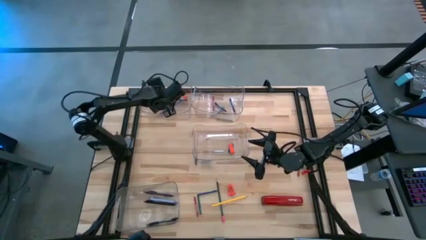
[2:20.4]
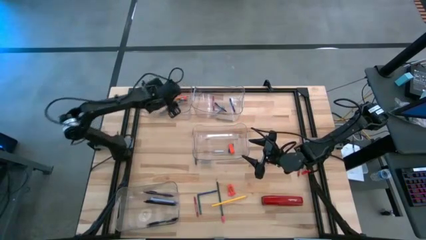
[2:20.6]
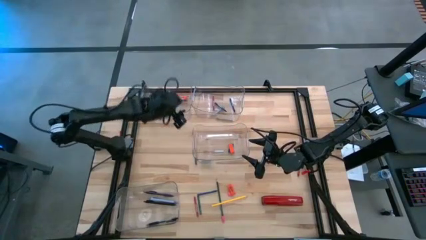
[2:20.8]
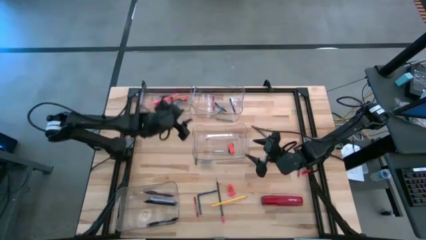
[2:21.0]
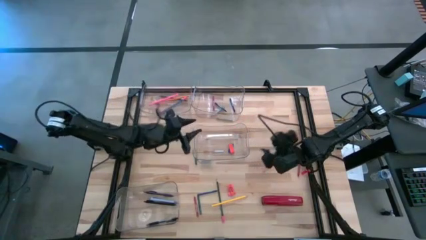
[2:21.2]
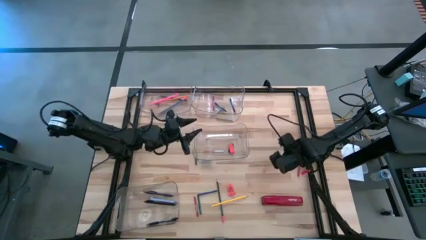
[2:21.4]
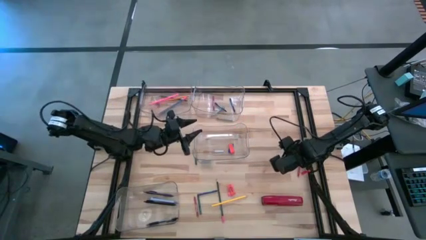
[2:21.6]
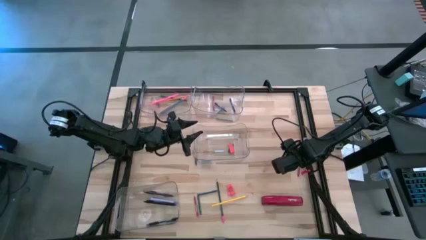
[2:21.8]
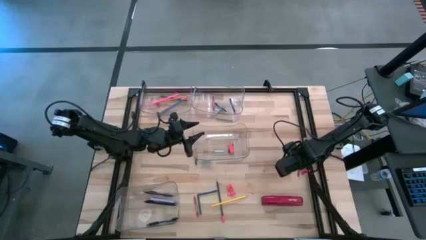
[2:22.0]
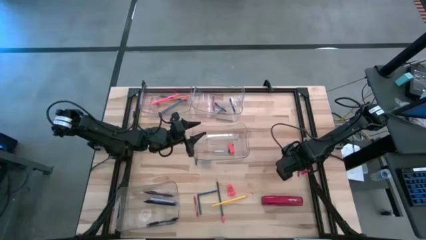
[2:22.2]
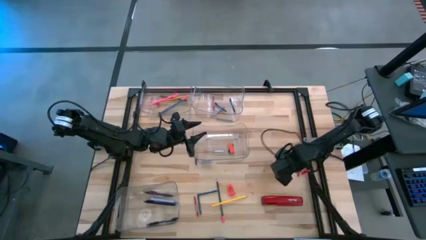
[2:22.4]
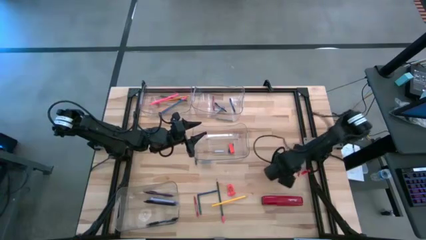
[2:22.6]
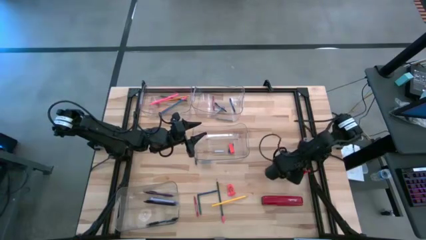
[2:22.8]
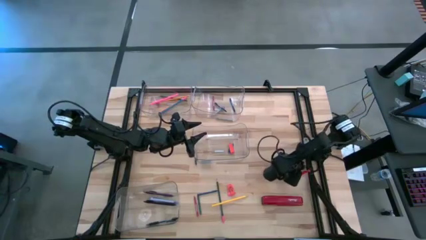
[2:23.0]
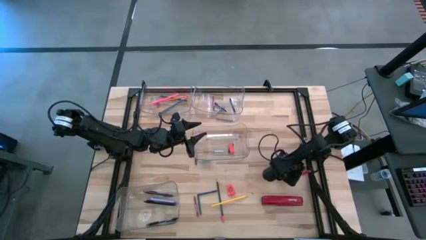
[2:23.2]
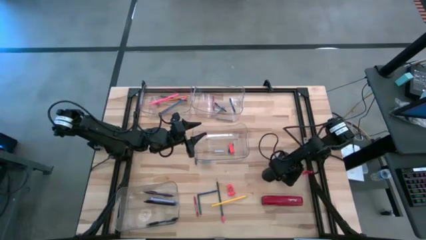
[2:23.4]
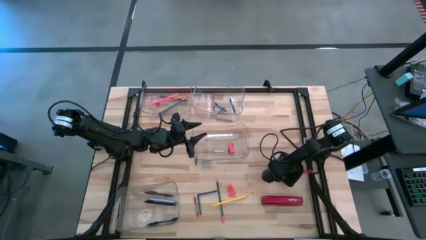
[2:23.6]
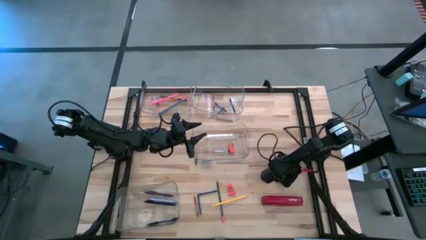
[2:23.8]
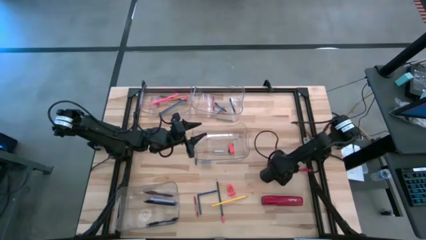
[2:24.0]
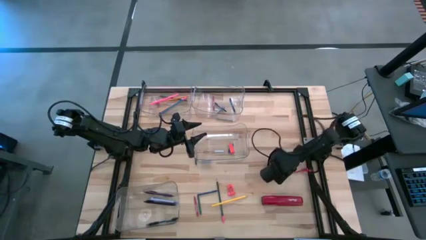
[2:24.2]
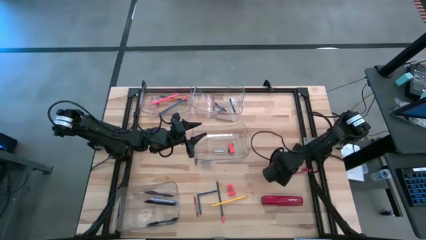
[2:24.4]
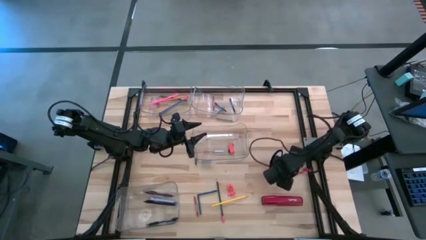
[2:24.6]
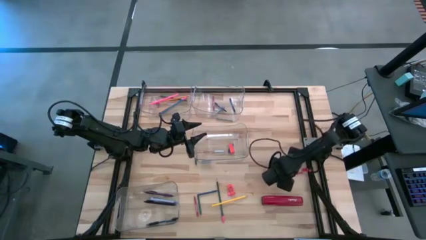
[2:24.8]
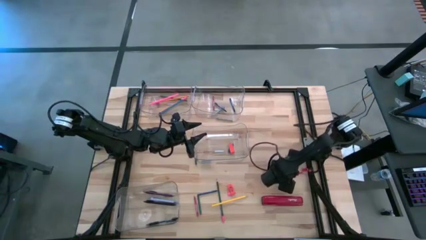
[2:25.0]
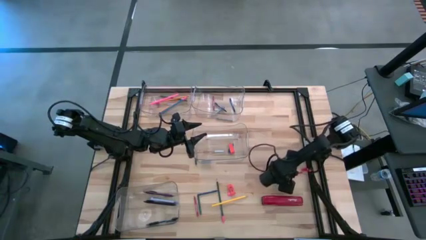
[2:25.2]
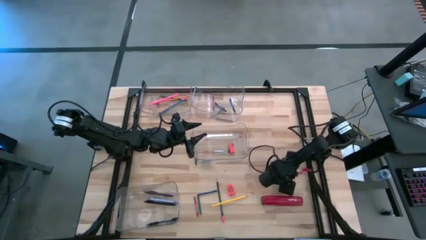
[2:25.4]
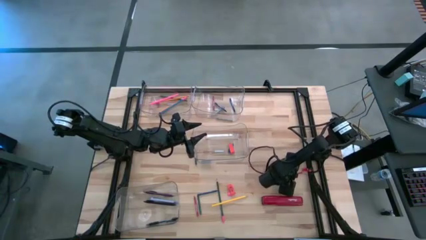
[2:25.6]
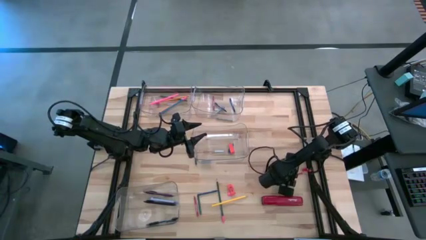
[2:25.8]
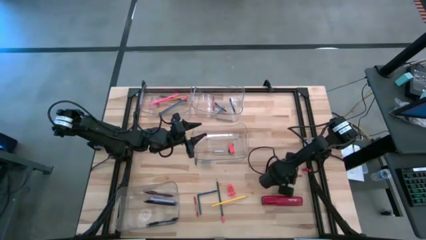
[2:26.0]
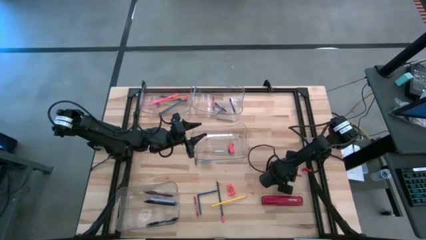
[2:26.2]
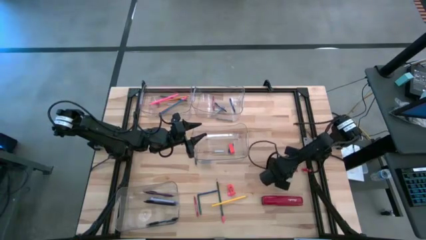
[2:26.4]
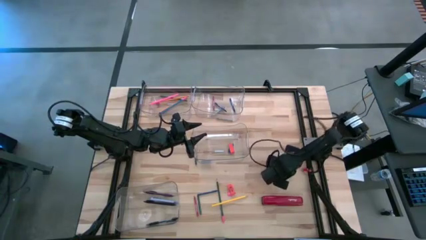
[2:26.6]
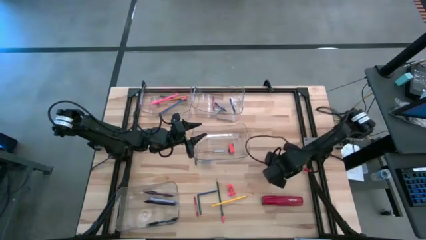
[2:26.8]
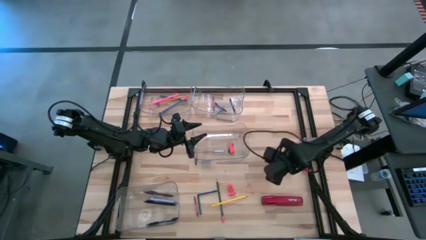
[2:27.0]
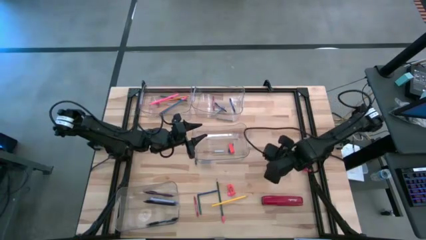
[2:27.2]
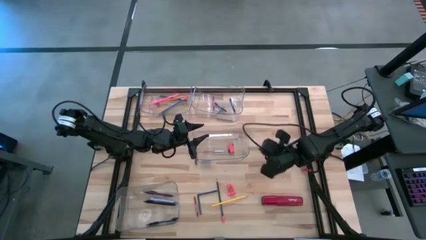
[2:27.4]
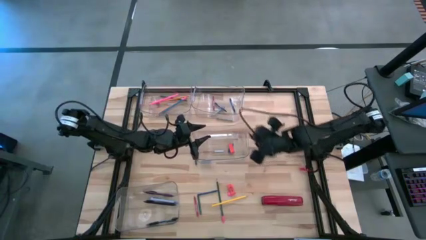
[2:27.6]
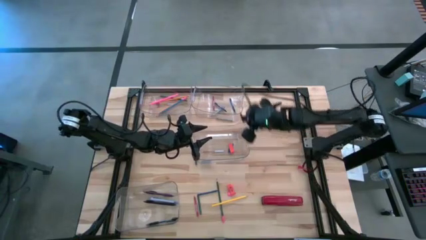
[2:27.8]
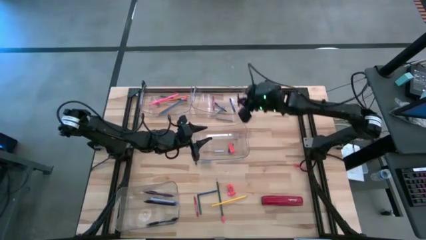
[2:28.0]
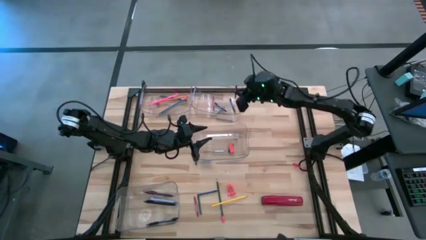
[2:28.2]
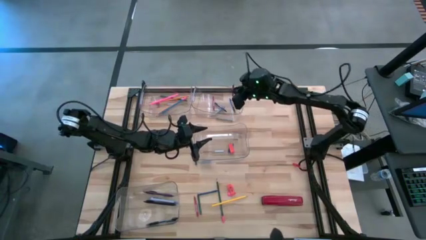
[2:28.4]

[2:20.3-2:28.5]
Task: Sort crayons/erasers/pens/pencils in bins
Put the top red crayon into the top right transparent bin

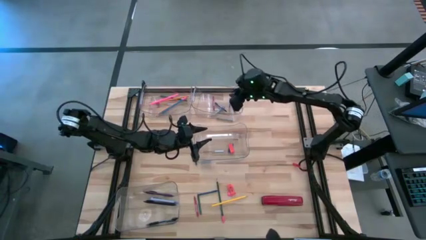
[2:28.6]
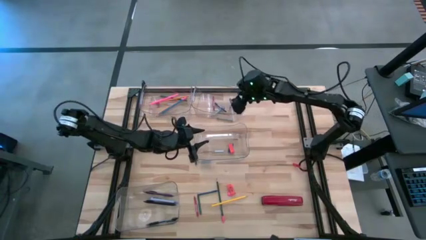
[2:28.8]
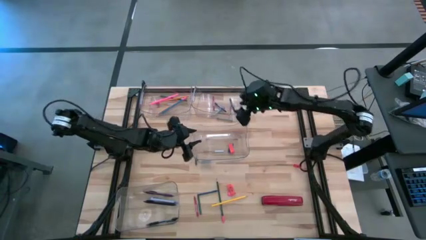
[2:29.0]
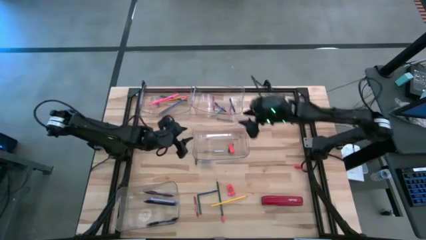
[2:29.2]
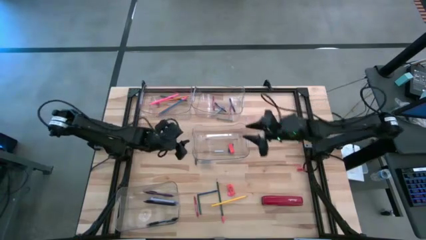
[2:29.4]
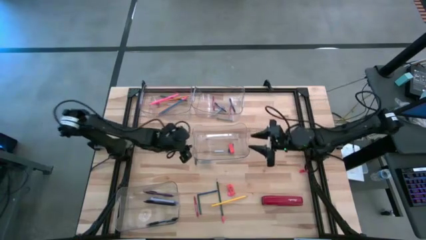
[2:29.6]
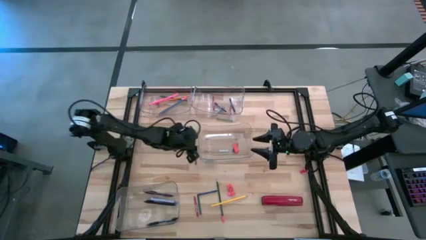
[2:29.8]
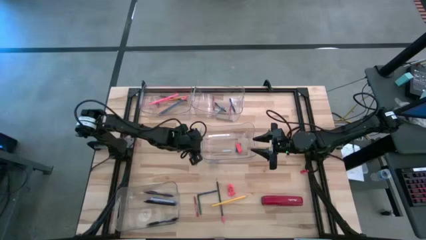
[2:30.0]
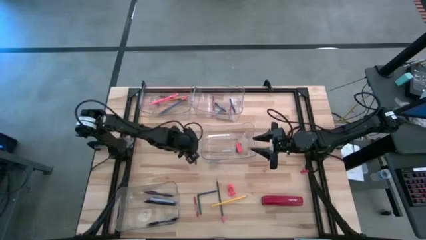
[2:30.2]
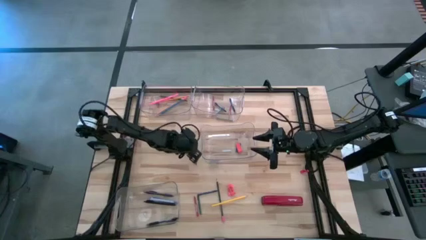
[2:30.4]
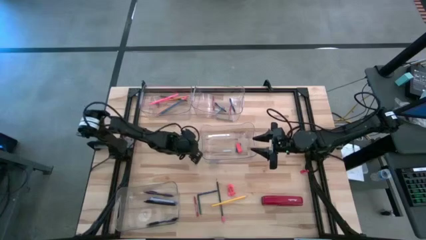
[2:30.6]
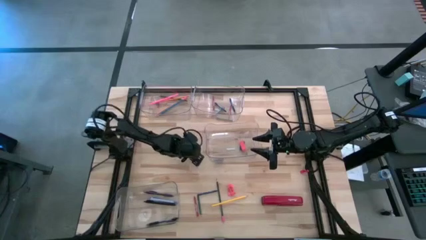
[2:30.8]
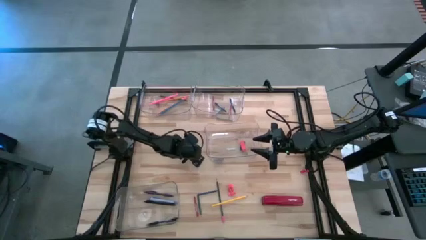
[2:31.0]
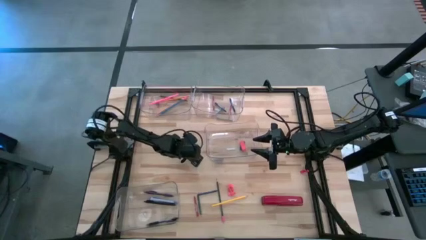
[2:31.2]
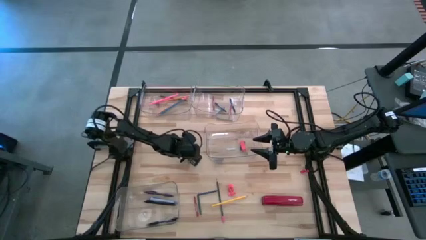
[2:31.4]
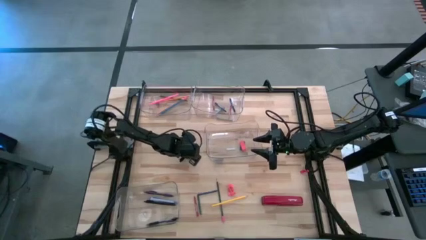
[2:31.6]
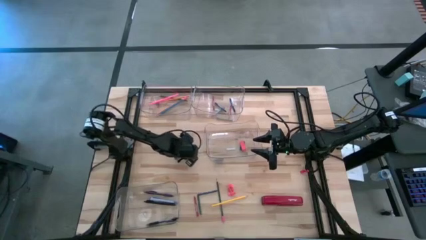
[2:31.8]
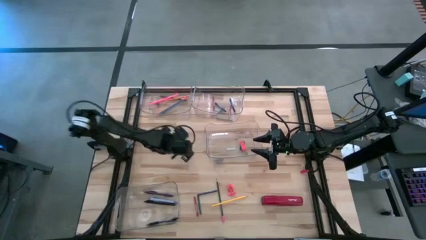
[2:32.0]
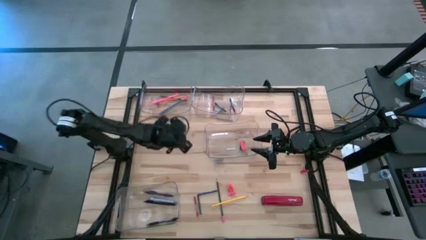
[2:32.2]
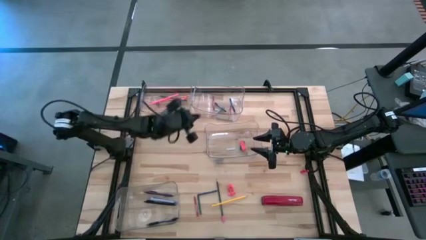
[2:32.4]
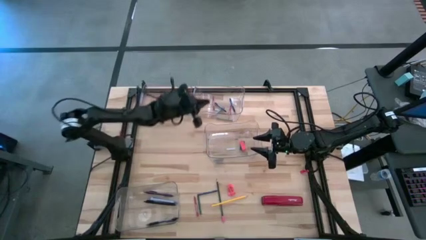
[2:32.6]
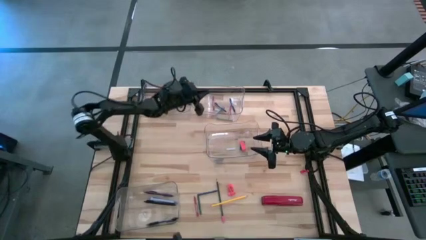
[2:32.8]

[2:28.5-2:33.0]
Put the top green crayon into the top right transparent bin

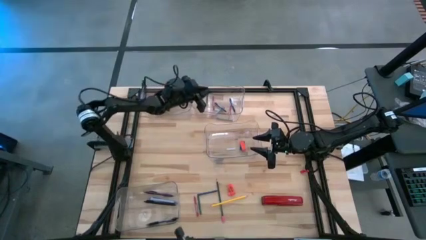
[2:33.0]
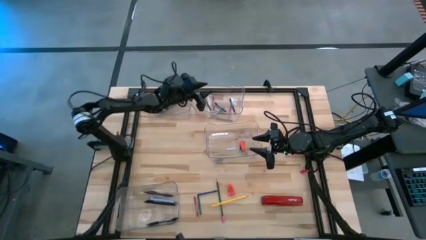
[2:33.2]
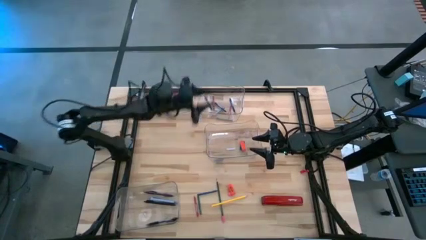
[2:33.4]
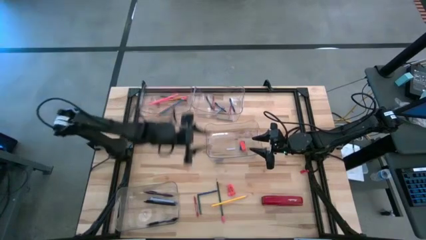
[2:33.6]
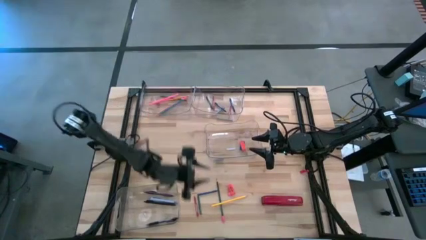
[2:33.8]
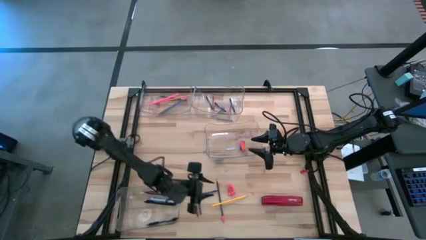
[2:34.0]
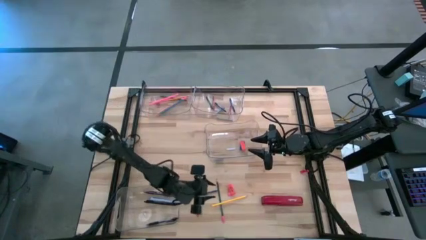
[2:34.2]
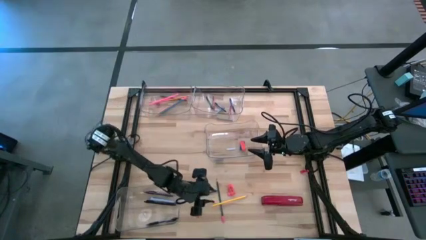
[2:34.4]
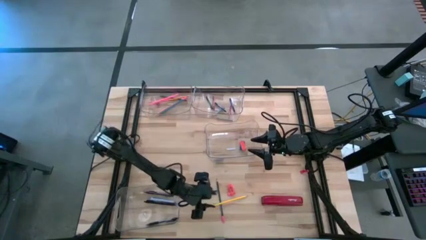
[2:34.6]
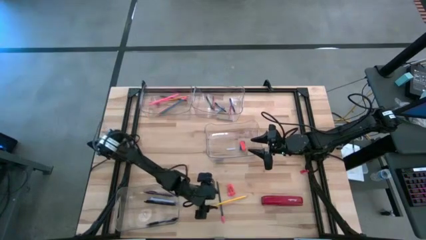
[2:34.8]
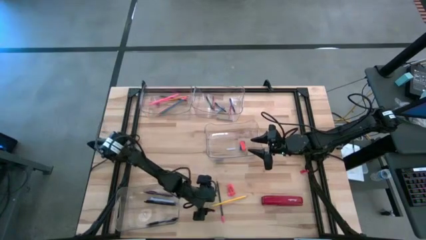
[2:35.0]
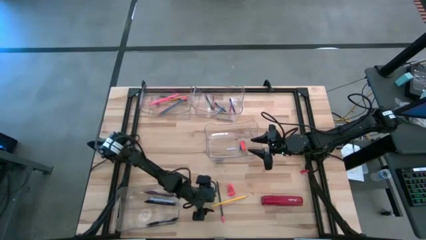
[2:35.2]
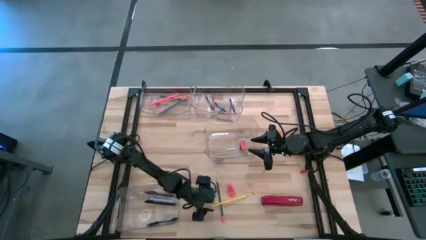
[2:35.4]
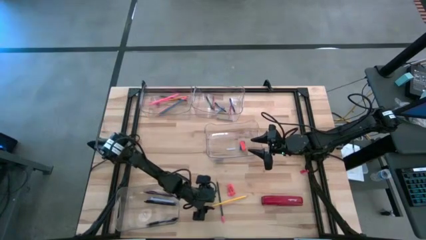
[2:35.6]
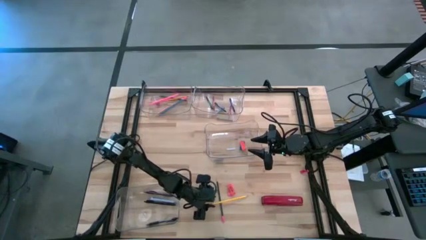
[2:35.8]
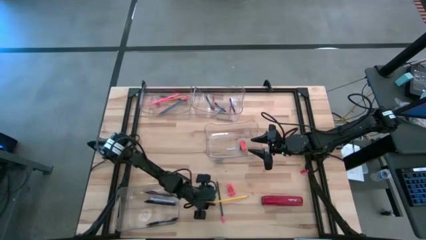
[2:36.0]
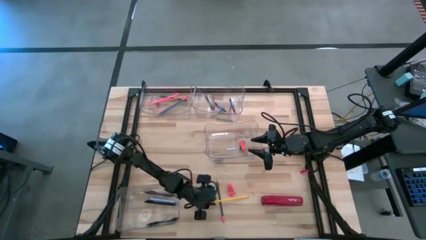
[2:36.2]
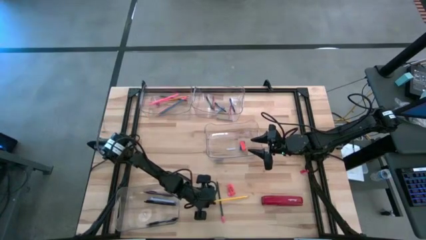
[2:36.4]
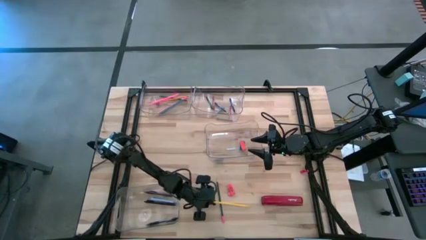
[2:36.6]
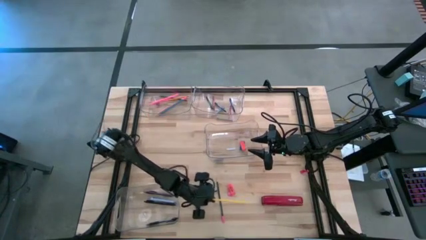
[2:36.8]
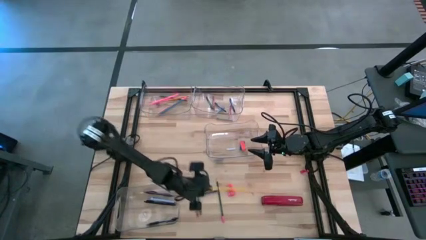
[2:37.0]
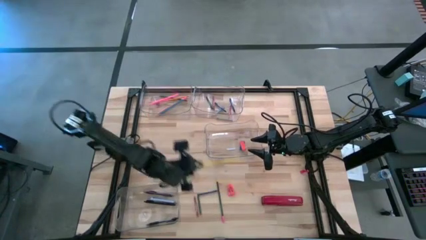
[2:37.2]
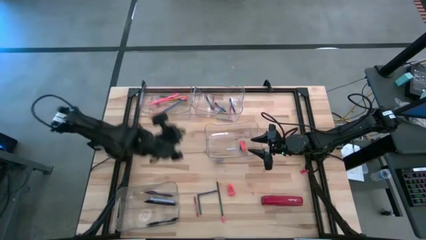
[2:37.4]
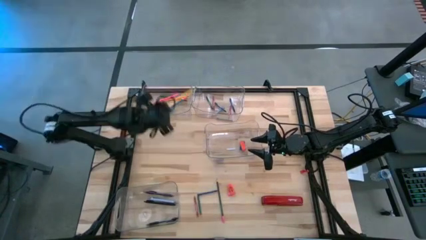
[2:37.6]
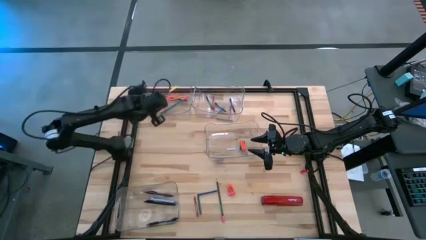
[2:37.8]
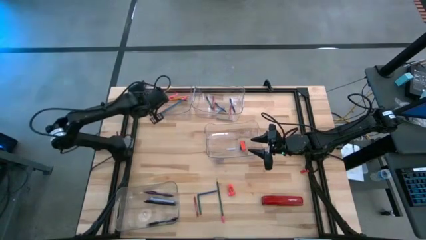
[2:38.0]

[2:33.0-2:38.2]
Put the yellow pencil into the top left transparent bin
